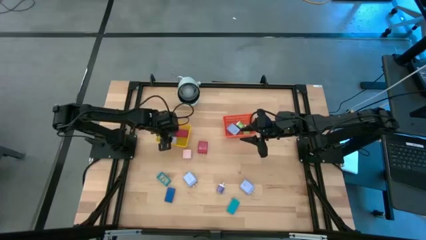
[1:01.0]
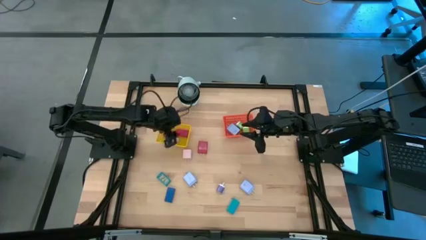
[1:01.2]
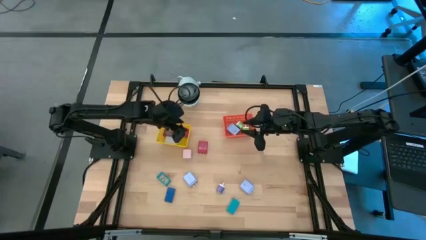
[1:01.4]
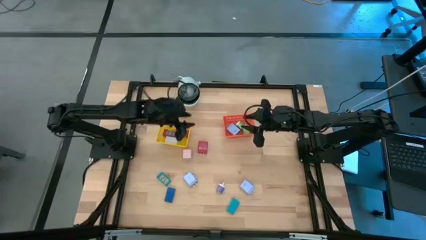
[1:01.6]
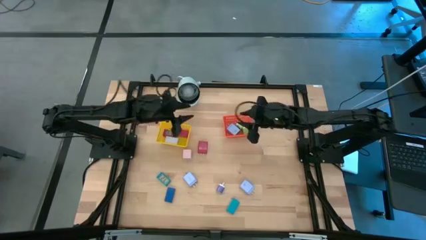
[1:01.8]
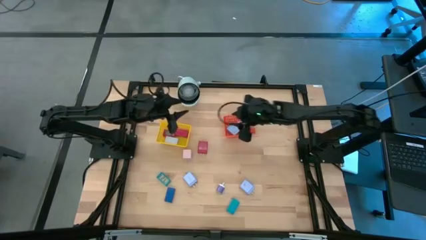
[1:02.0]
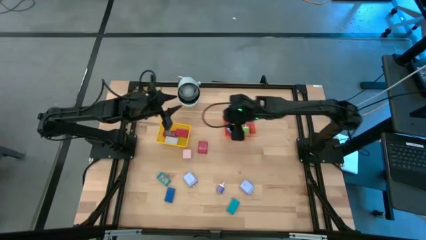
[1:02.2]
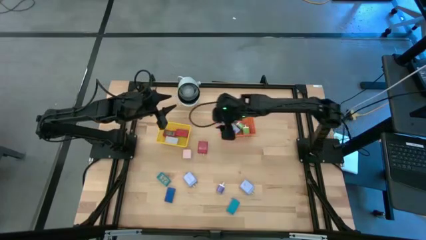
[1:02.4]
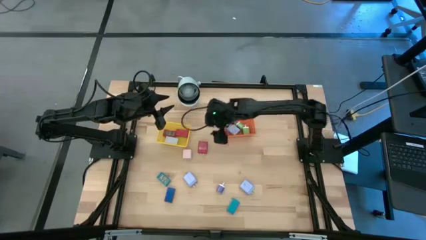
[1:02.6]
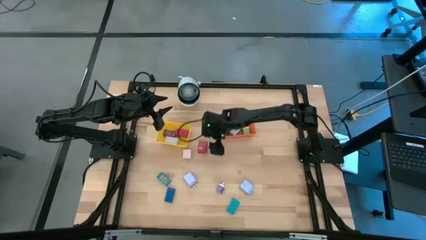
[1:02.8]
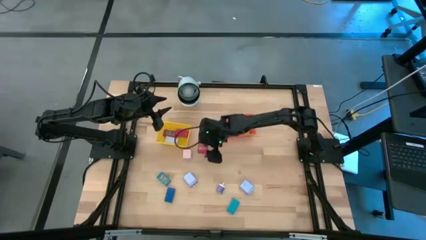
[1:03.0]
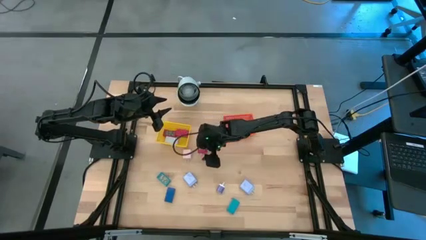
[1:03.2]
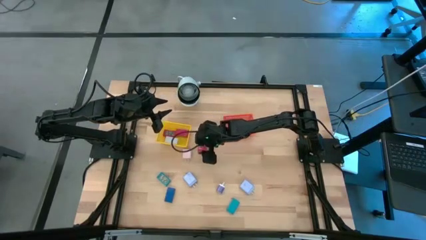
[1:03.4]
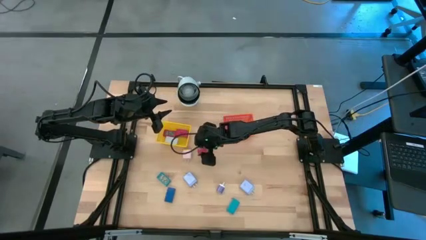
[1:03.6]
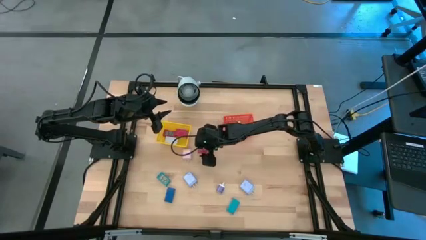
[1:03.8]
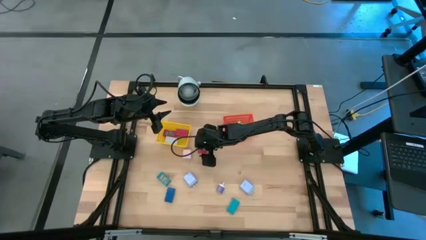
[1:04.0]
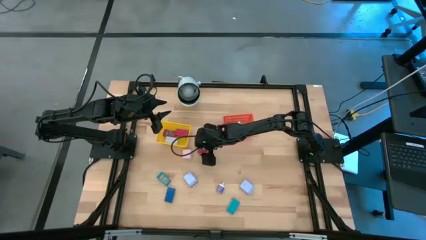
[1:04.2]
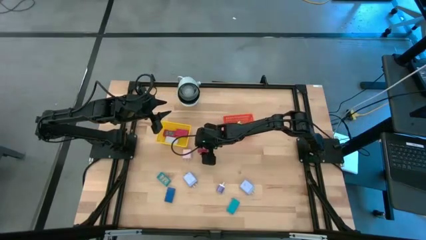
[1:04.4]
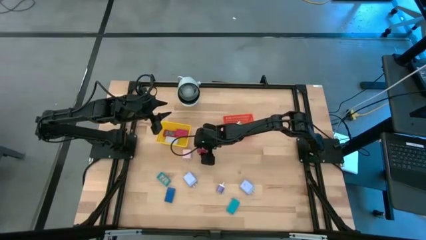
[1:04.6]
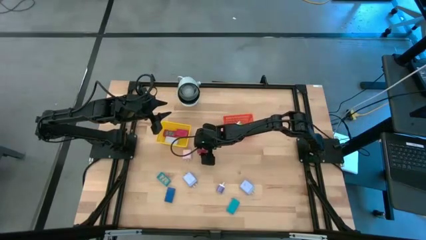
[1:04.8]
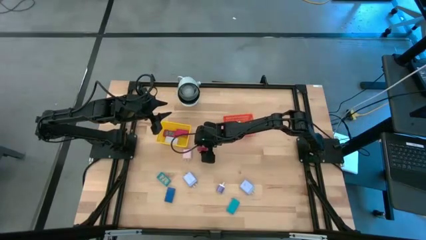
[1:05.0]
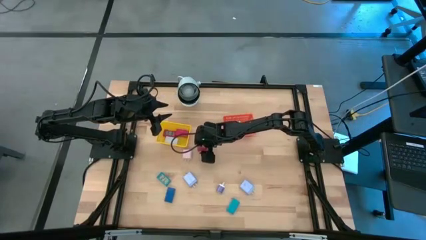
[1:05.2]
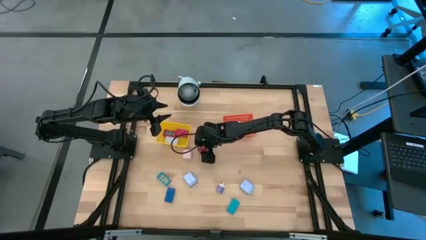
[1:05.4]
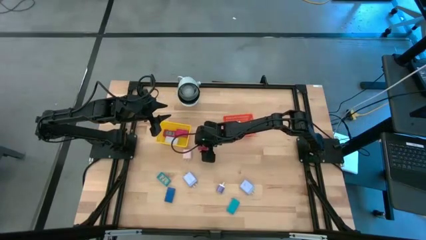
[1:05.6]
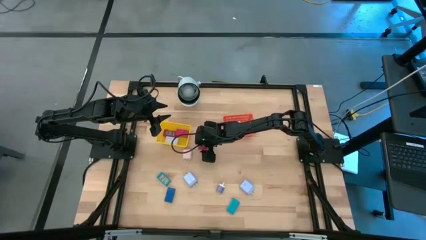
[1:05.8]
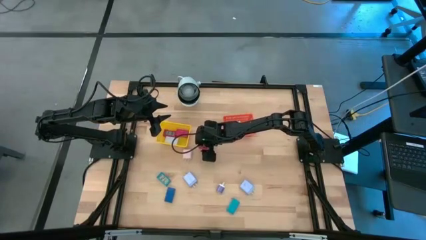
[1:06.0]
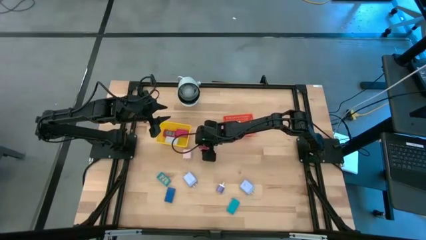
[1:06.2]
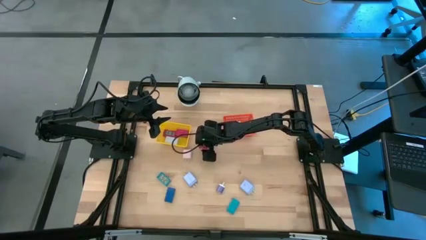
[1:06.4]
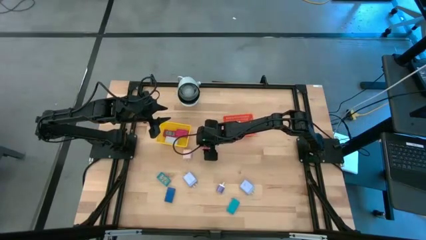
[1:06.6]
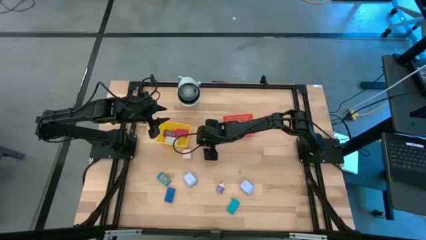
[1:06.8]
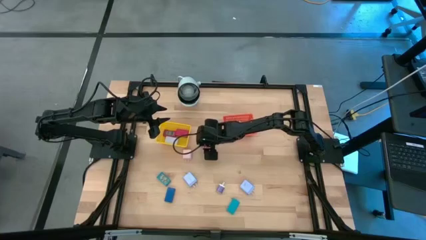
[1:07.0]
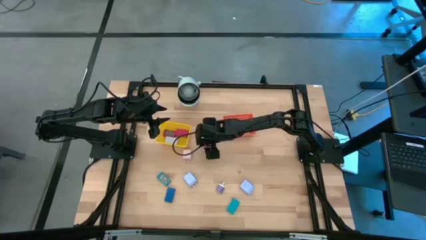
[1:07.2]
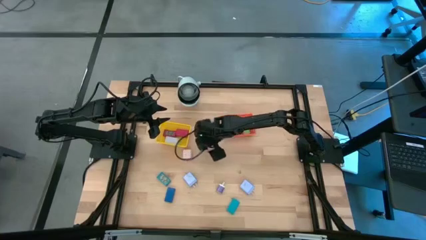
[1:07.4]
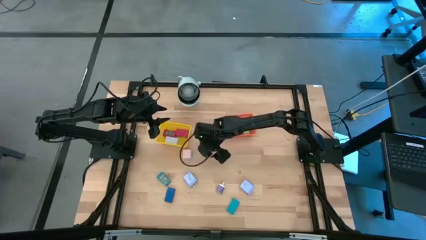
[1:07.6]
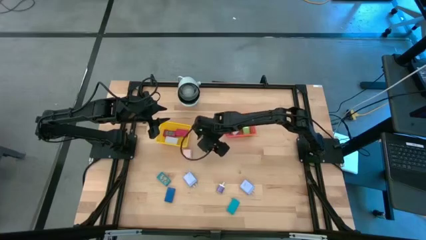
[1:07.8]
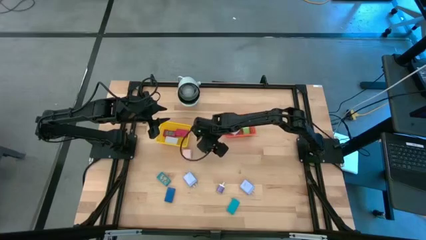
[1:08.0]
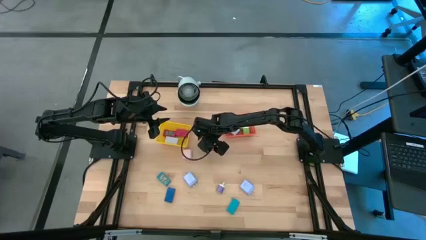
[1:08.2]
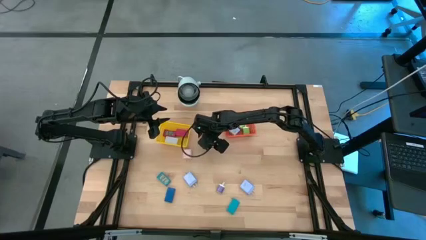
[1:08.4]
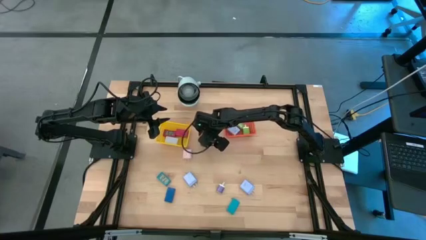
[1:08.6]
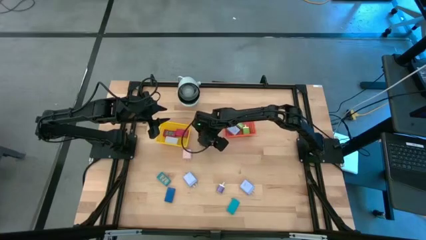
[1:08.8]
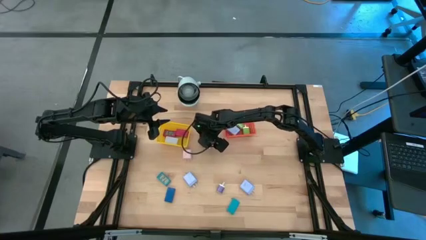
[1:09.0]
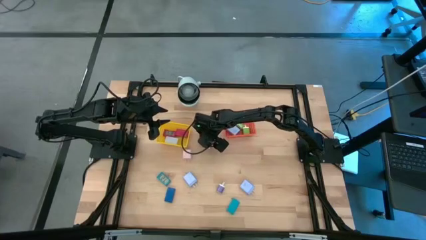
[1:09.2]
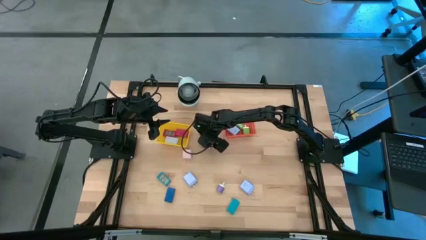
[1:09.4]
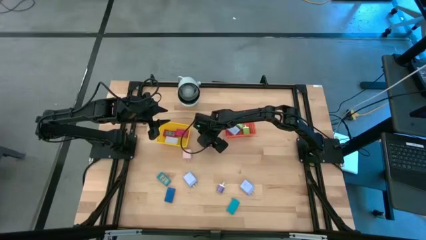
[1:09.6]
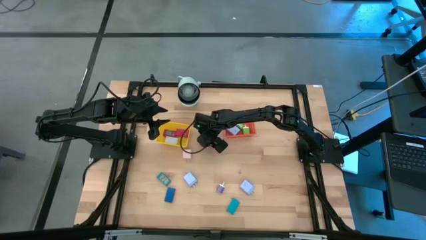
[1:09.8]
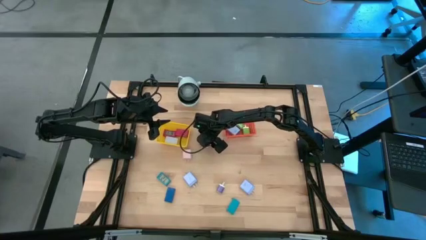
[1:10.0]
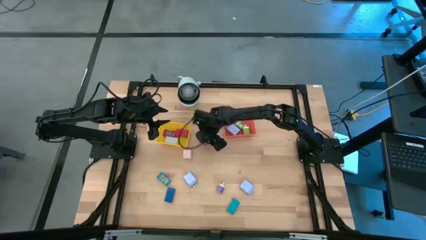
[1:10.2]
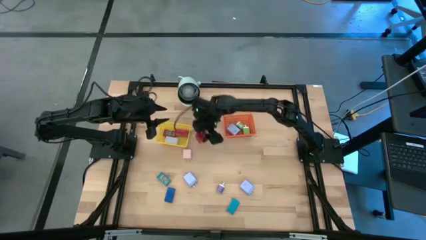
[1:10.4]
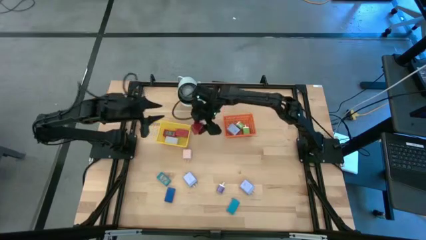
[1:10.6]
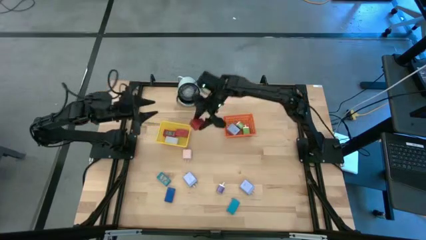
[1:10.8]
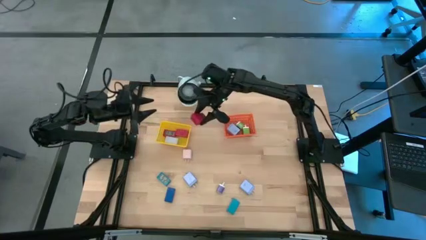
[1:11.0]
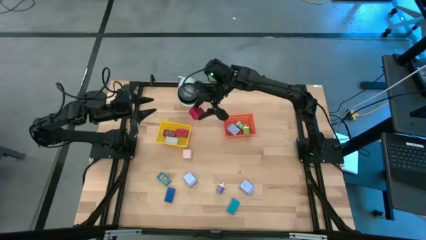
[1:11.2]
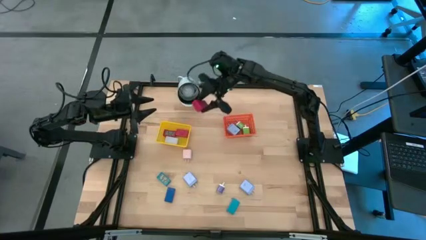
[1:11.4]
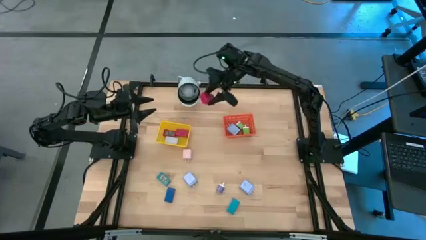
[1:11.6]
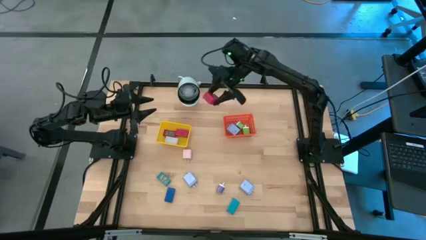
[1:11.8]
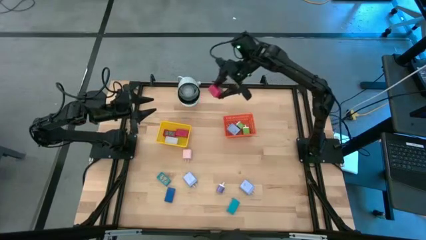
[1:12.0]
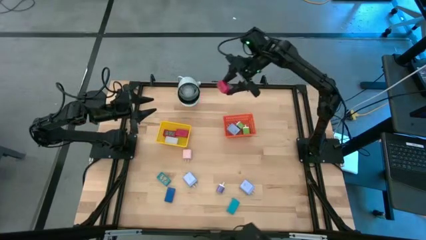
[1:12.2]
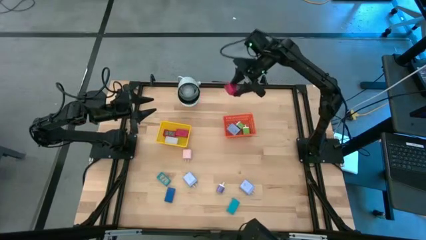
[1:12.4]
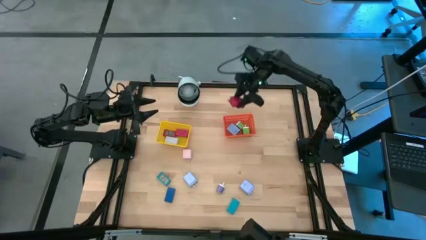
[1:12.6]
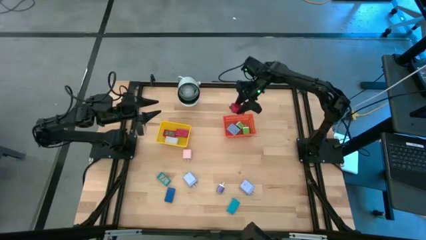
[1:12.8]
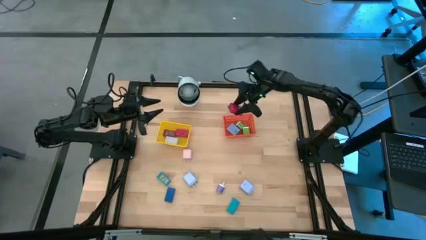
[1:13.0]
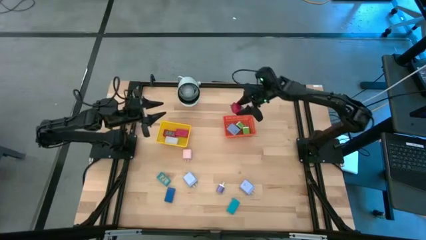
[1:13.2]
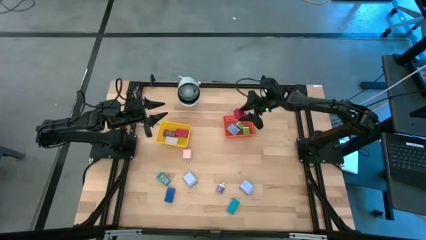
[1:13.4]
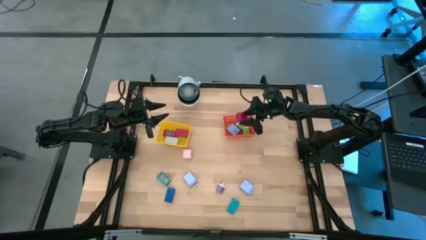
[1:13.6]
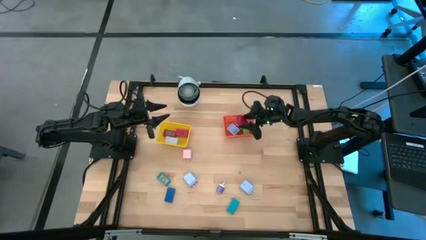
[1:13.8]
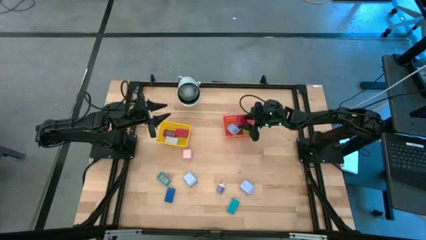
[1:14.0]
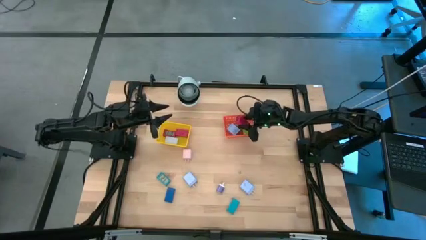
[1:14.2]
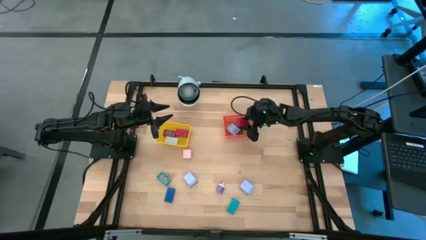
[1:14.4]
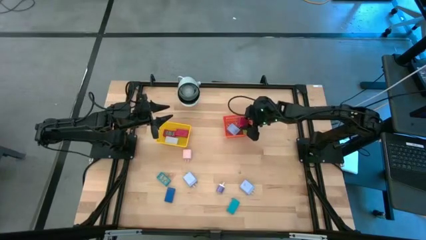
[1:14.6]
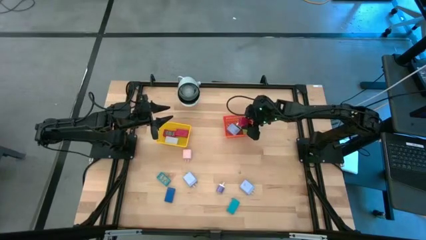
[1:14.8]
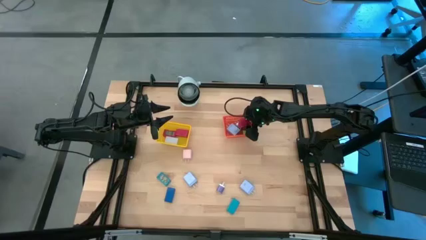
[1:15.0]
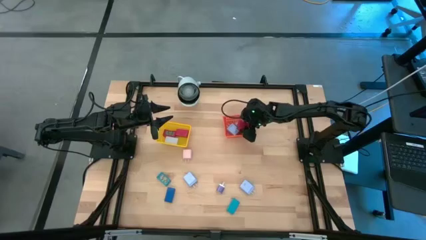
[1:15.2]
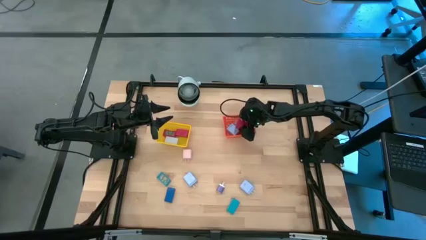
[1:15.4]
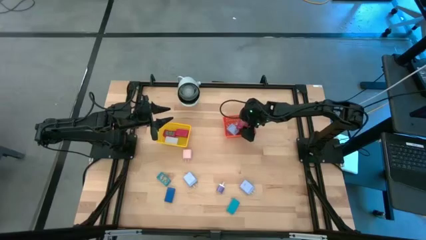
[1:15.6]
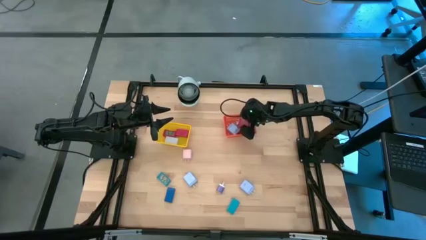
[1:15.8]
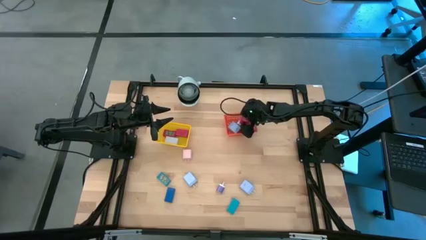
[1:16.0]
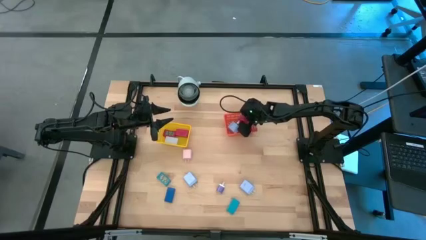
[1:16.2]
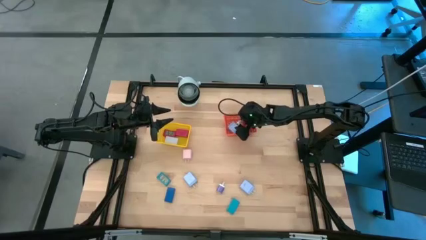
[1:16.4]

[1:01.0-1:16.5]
Task: Pick & Place Office items
Put the red charger adapter into the orange bin
